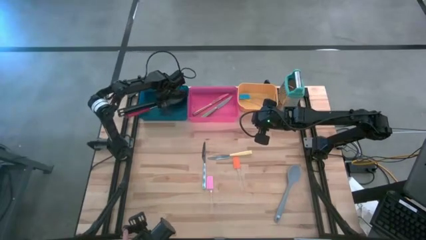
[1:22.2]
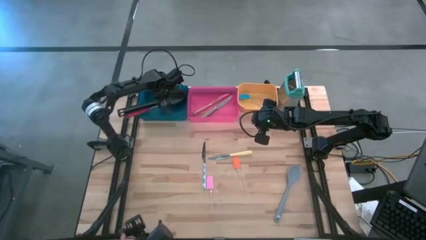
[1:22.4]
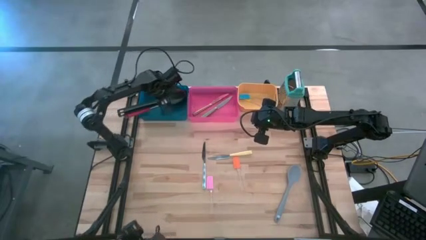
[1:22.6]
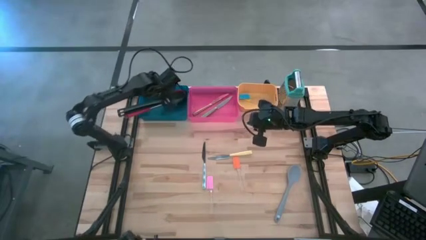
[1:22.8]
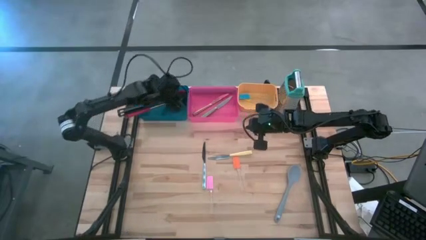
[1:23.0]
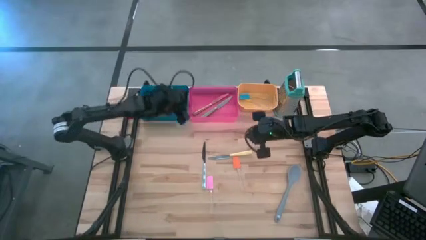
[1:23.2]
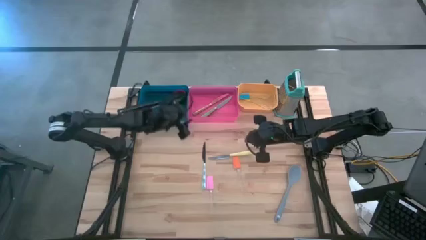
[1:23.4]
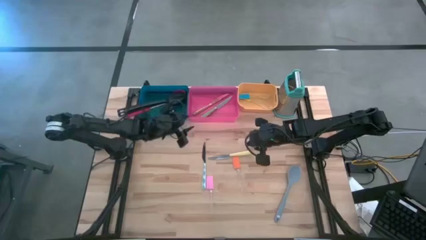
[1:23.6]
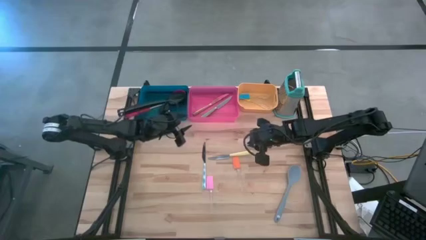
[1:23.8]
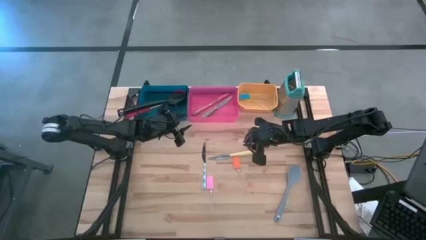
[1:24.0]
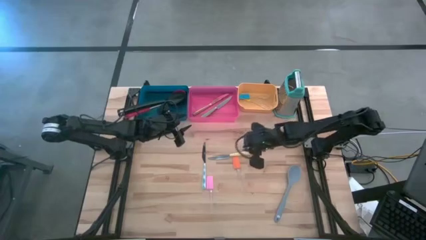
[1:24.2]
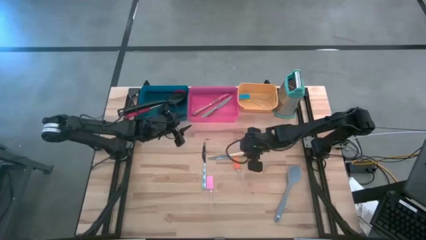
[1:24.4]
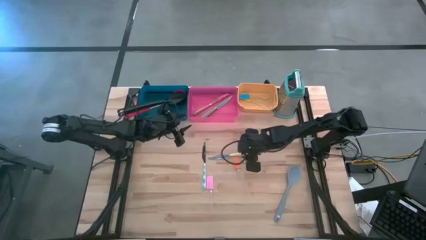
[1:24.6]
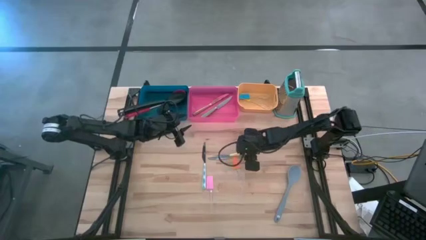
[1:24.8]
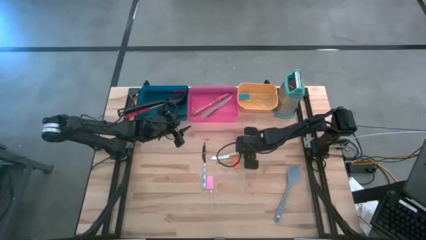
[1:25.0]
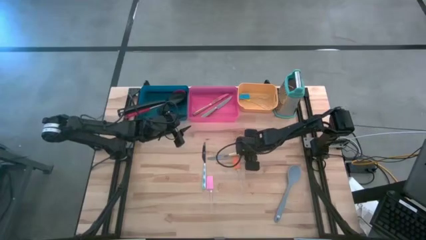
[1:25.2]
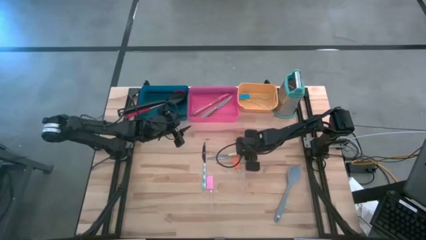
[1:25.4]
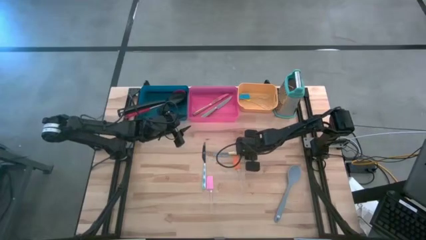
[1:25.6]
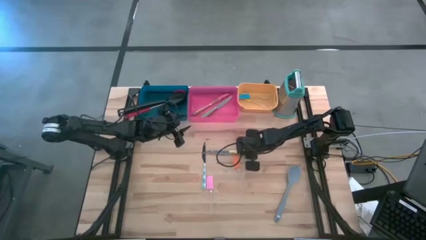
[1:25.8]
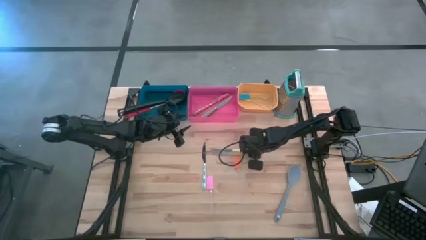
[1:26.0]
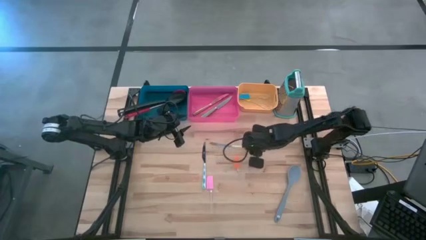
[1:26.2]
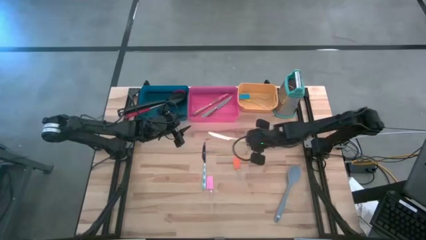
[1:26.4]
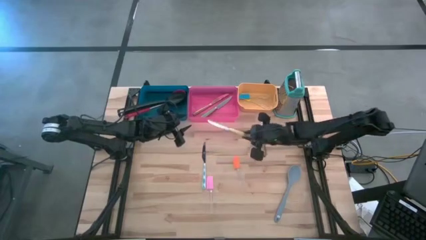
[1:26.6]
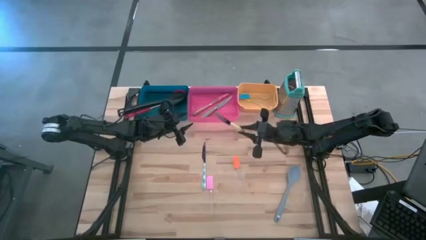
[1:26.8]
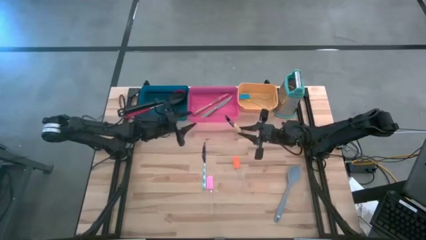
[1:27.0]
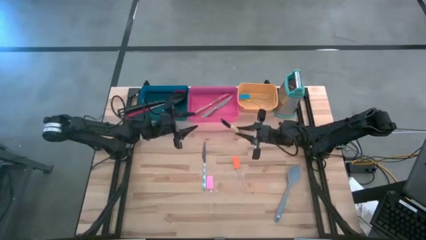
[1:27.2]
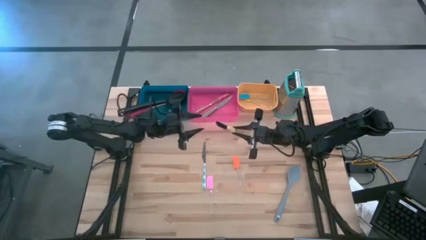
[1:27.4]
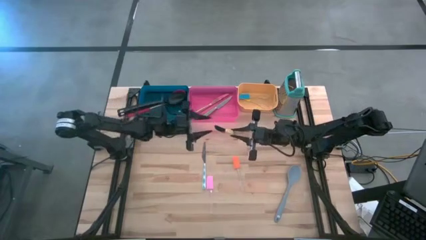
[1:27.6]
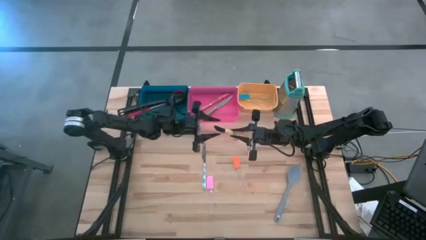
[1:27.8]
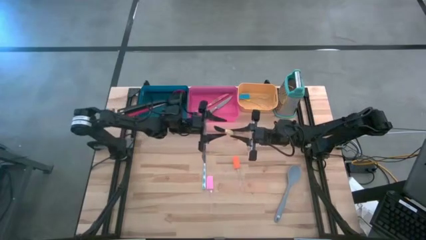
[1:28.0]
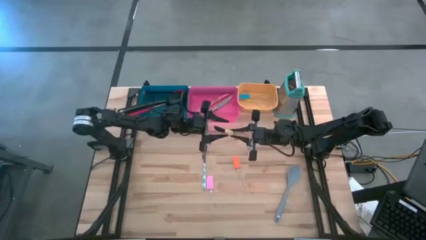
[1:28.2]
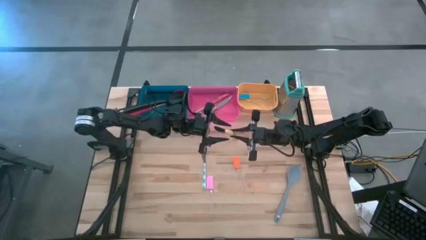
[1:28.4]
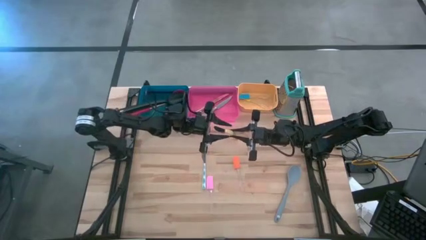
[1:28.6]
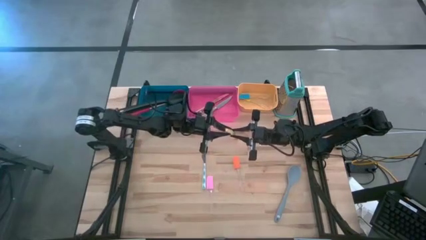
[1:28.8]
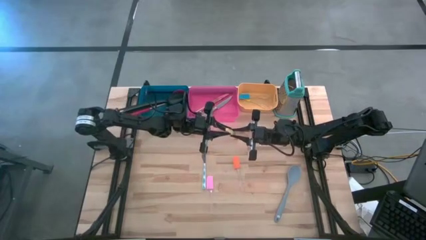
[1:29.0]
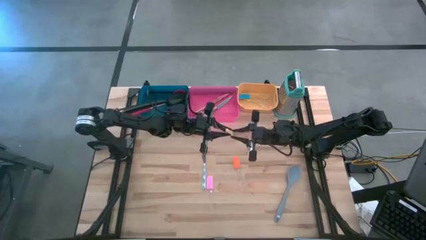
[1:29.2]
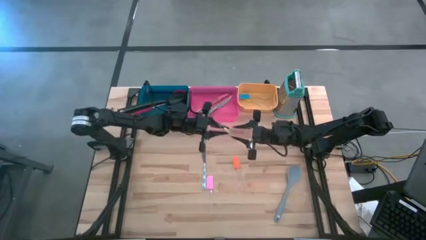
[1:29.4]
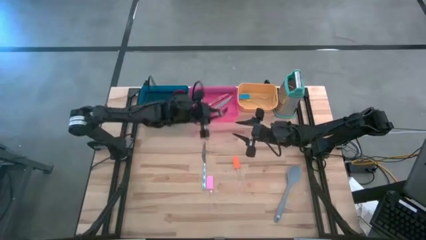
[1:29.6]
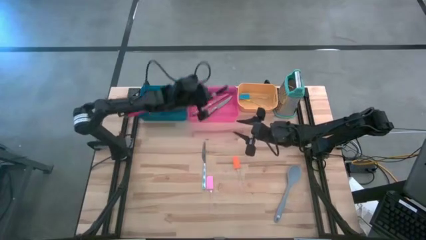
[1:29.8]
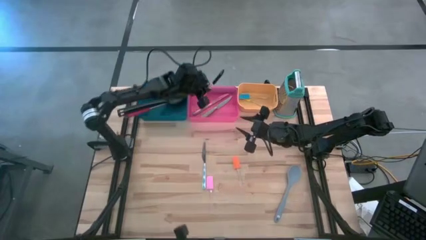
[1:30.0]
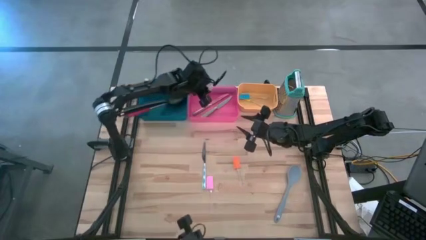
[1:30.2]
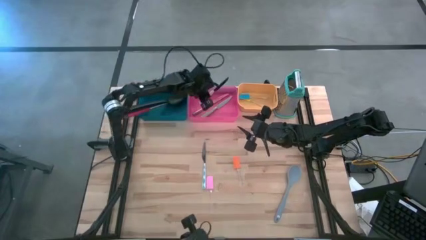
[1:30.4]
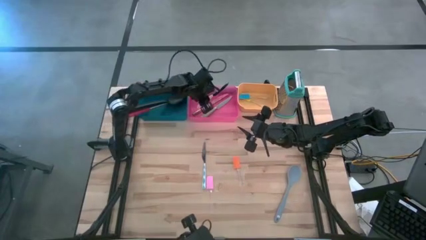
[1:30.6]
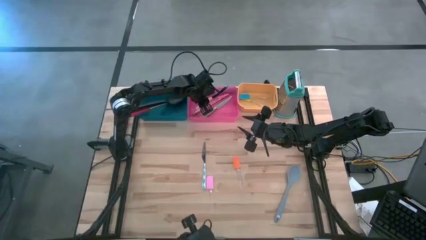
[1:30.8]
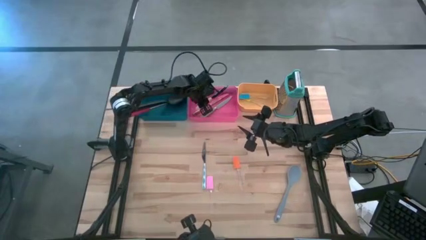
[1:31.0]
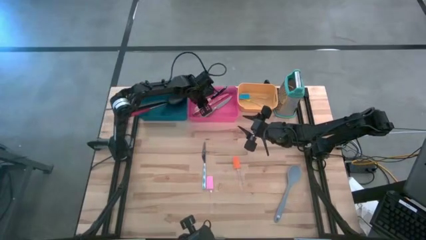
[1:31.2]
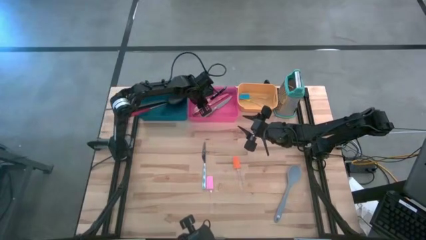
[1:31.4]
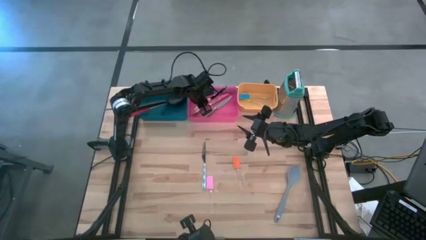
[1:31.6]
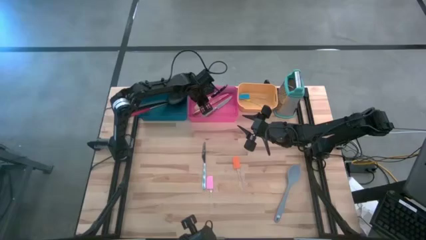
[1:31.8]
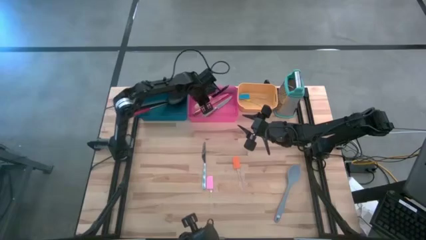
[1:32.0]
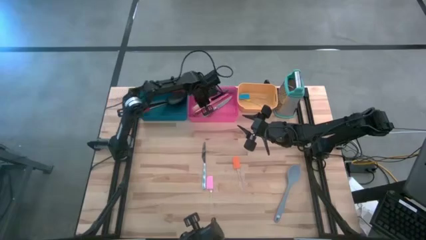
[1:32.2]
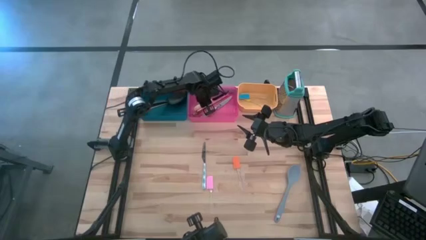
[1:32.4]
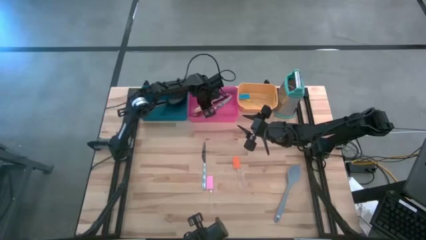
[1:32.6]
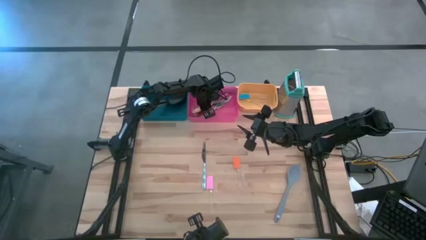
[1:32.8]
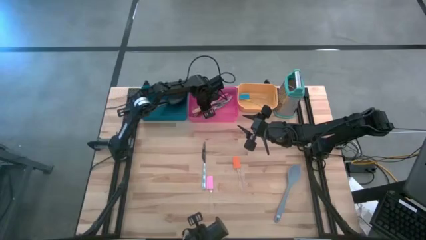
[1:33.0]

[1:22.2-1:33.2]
Task: Pick & Place Kitchen Items
Put the yellow knife into the pink bin
